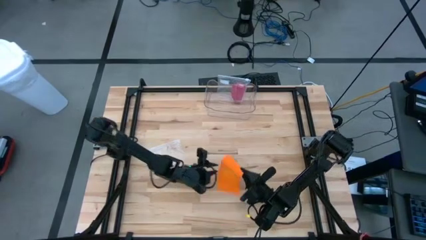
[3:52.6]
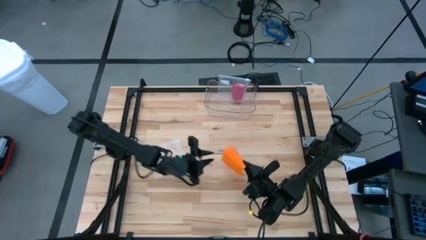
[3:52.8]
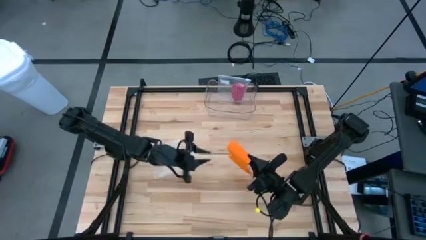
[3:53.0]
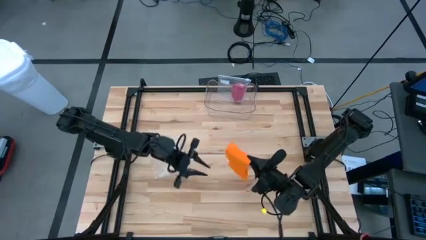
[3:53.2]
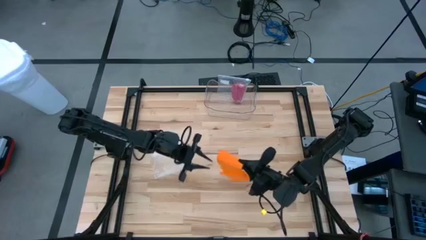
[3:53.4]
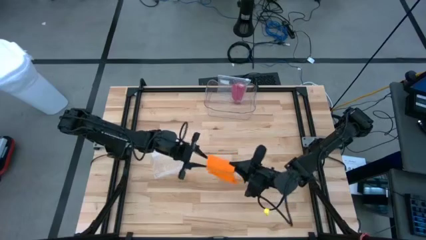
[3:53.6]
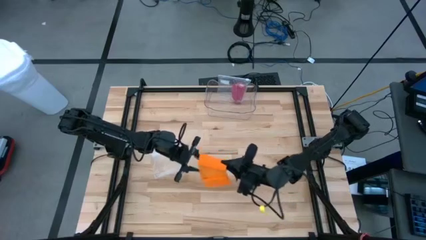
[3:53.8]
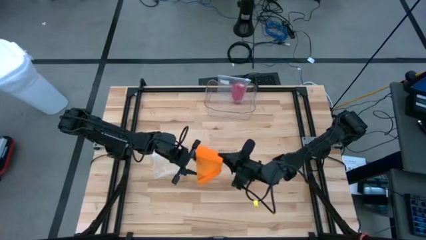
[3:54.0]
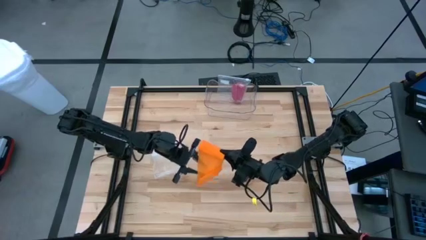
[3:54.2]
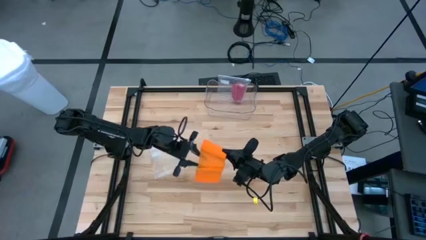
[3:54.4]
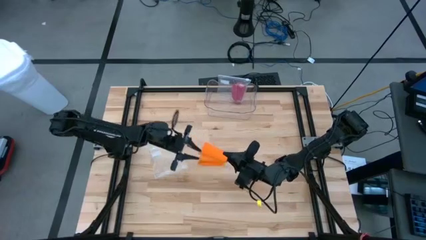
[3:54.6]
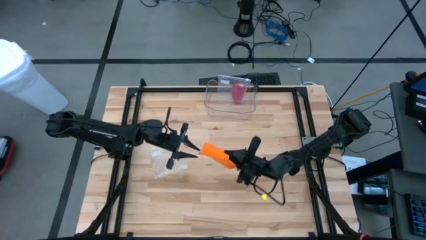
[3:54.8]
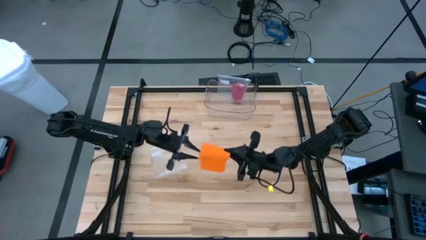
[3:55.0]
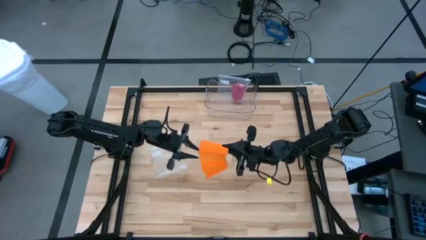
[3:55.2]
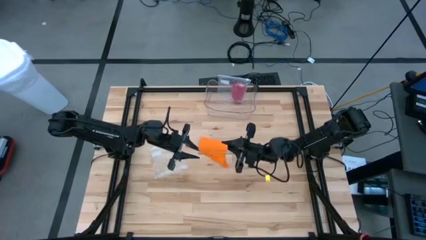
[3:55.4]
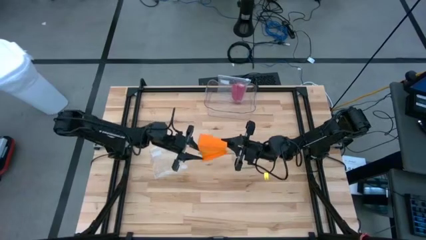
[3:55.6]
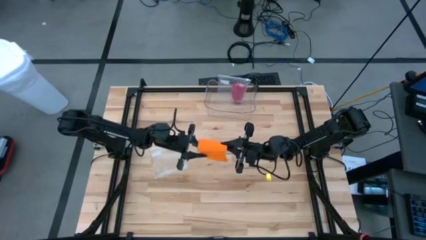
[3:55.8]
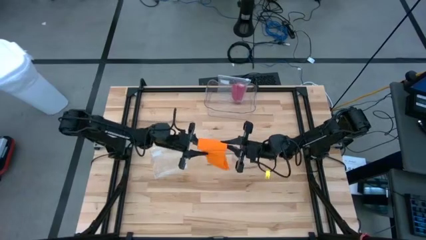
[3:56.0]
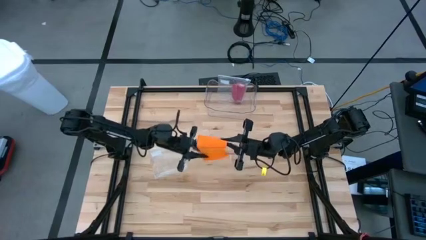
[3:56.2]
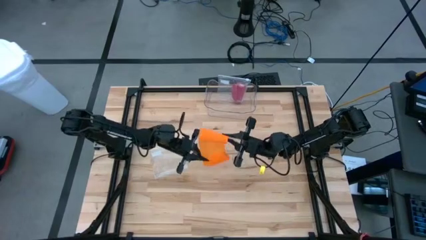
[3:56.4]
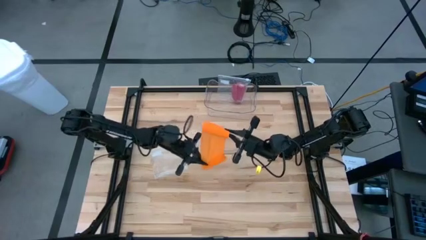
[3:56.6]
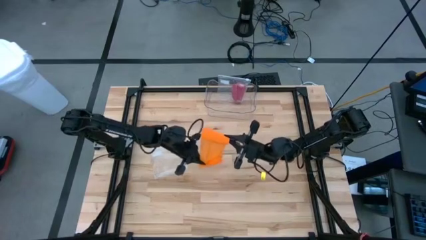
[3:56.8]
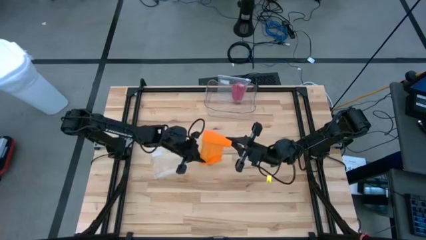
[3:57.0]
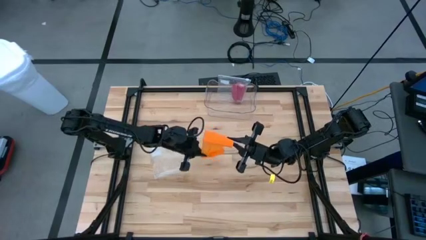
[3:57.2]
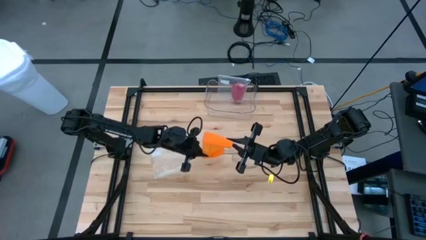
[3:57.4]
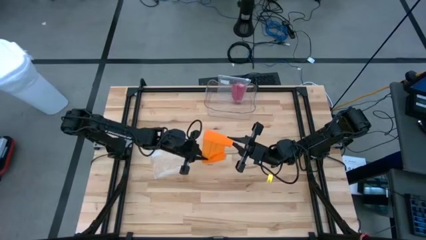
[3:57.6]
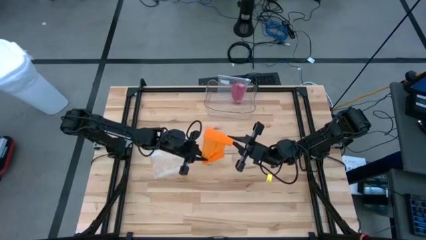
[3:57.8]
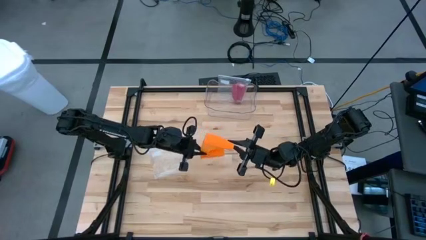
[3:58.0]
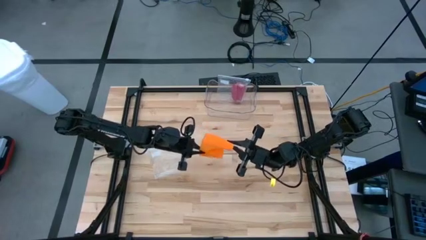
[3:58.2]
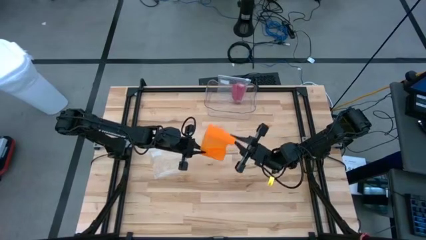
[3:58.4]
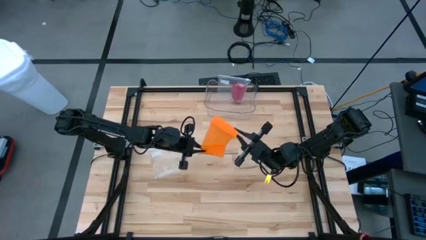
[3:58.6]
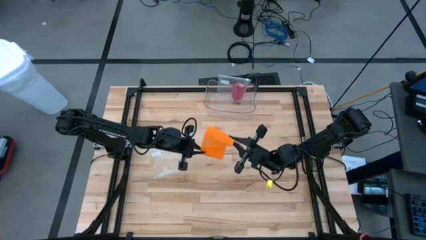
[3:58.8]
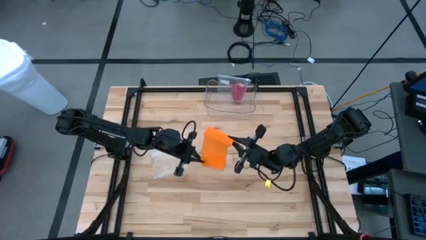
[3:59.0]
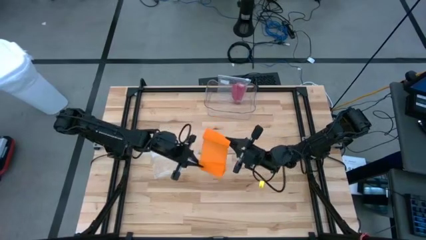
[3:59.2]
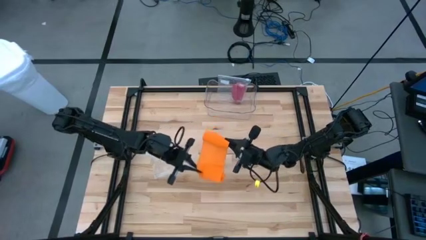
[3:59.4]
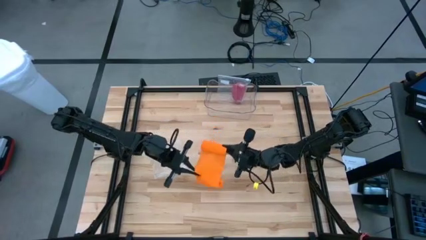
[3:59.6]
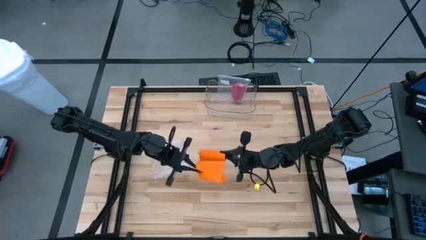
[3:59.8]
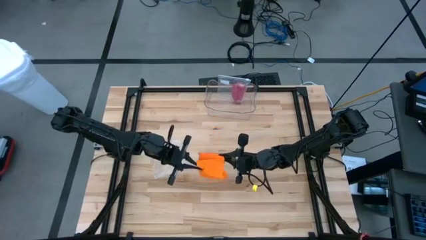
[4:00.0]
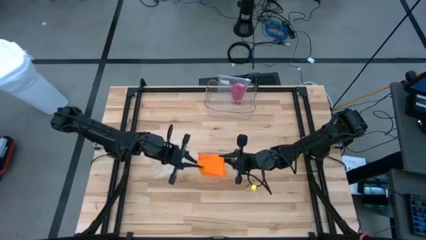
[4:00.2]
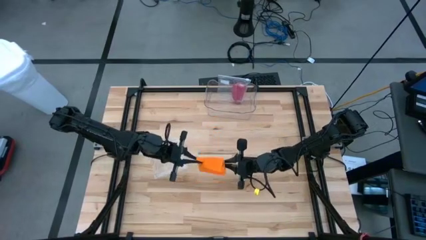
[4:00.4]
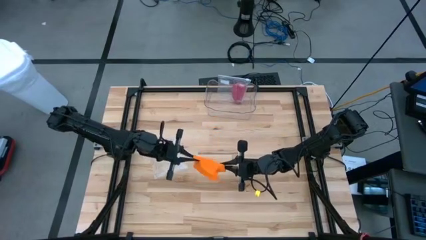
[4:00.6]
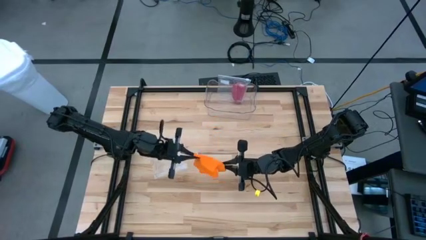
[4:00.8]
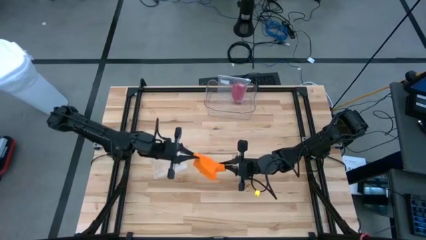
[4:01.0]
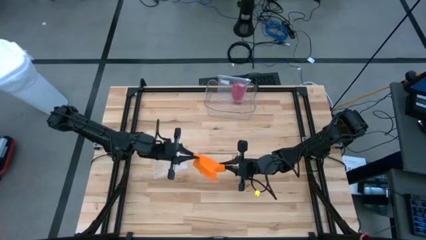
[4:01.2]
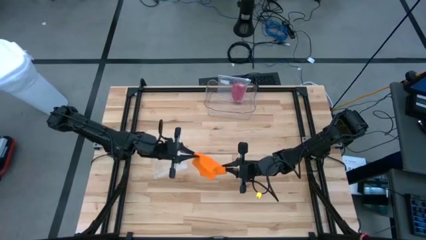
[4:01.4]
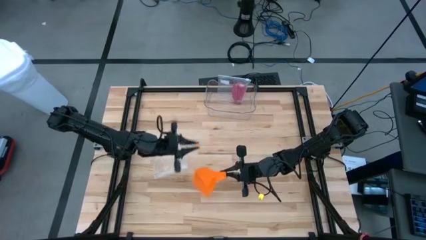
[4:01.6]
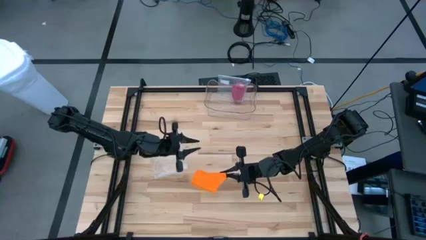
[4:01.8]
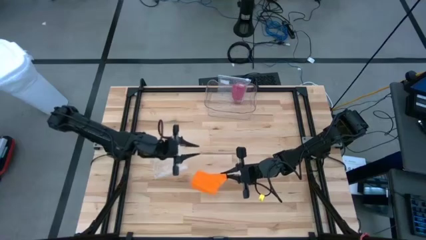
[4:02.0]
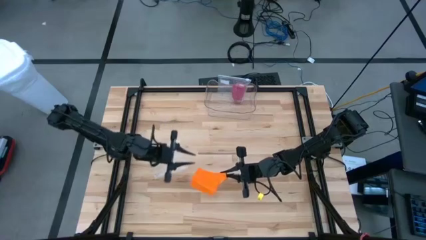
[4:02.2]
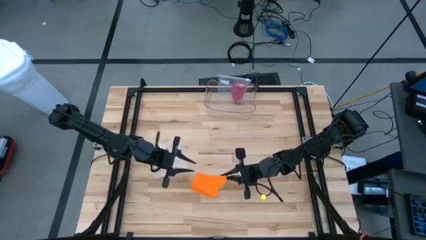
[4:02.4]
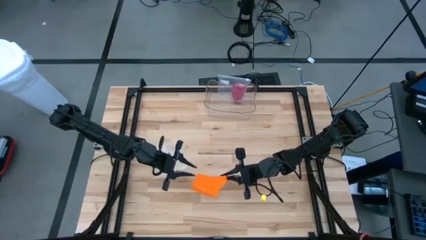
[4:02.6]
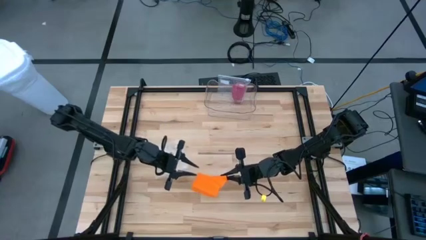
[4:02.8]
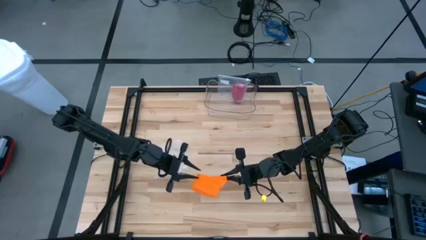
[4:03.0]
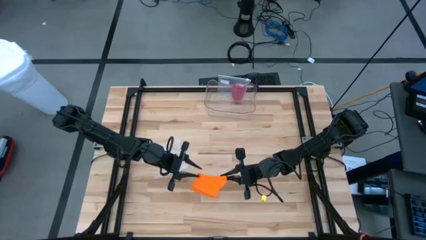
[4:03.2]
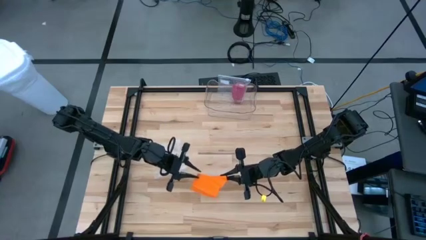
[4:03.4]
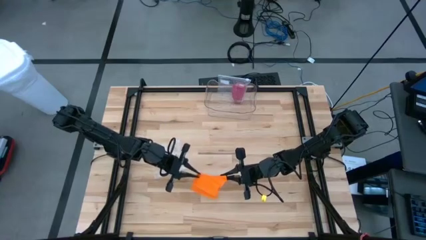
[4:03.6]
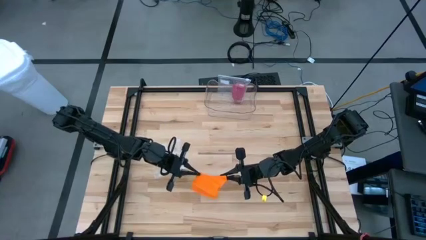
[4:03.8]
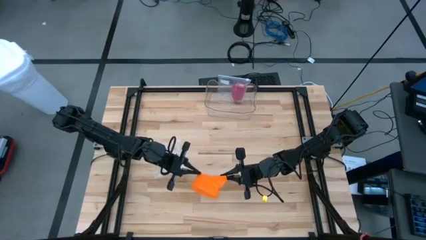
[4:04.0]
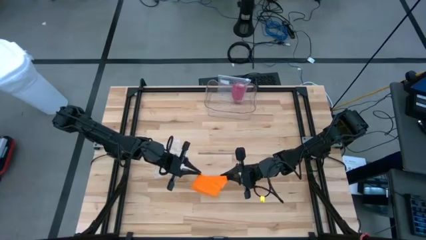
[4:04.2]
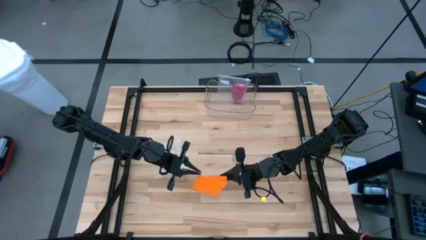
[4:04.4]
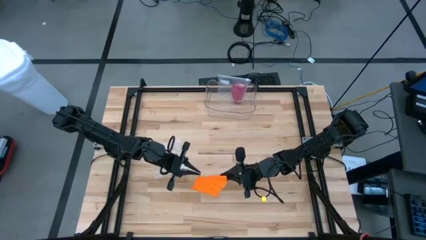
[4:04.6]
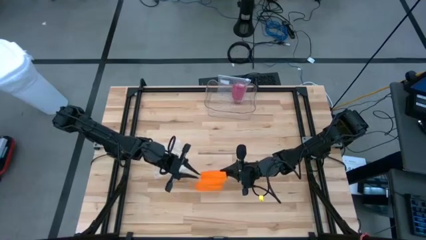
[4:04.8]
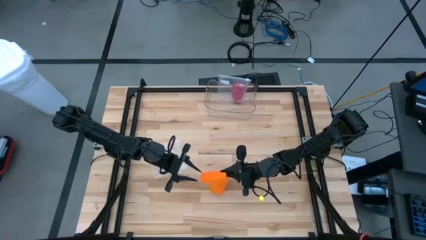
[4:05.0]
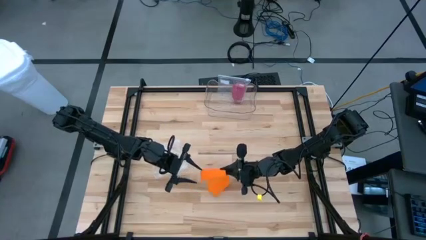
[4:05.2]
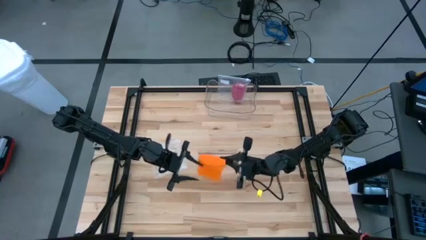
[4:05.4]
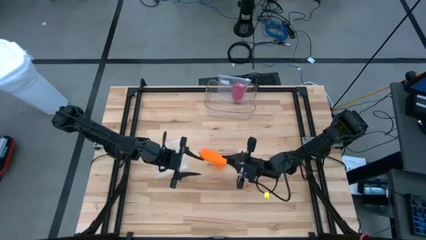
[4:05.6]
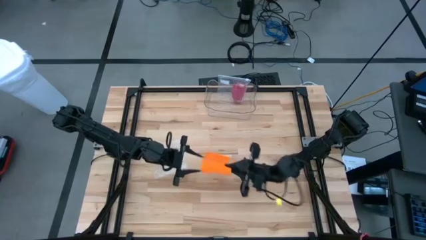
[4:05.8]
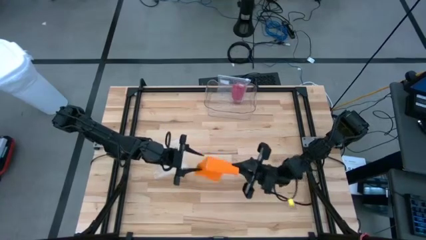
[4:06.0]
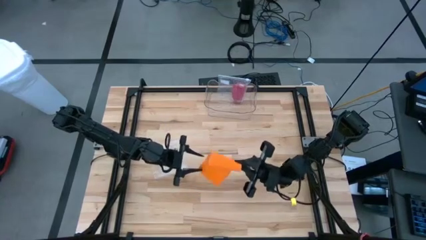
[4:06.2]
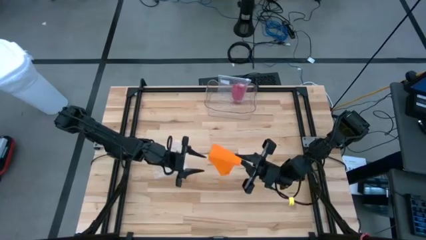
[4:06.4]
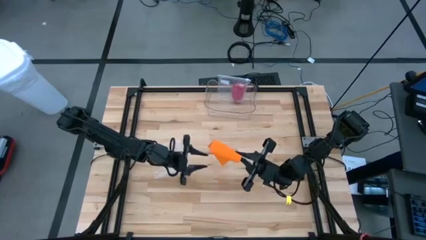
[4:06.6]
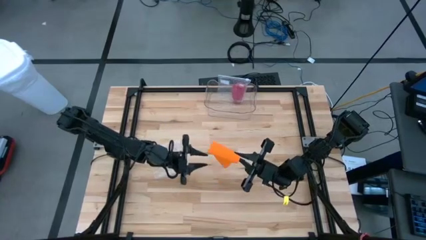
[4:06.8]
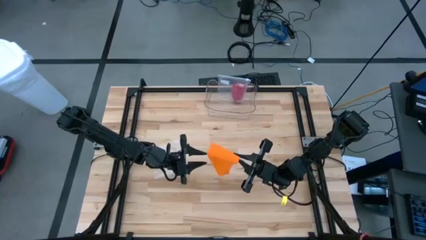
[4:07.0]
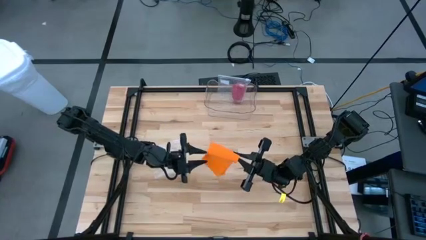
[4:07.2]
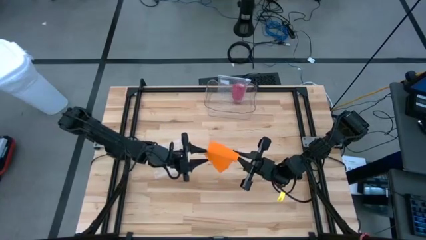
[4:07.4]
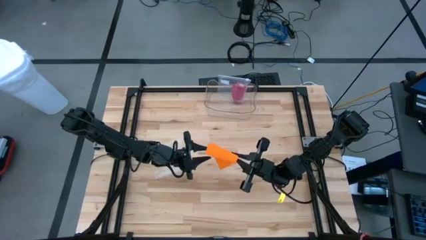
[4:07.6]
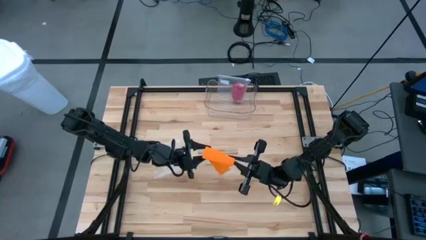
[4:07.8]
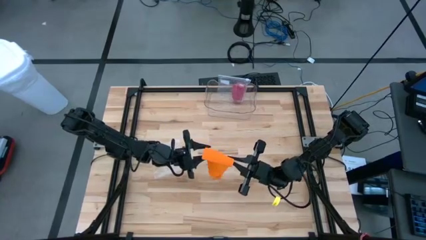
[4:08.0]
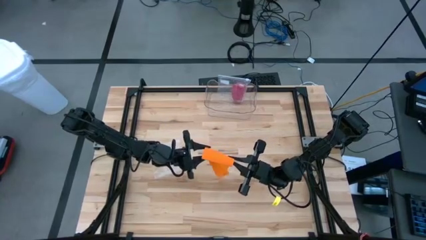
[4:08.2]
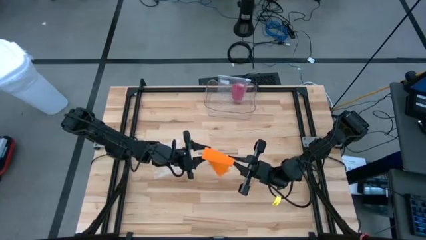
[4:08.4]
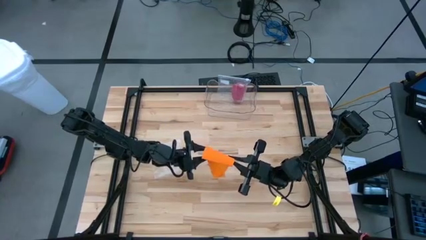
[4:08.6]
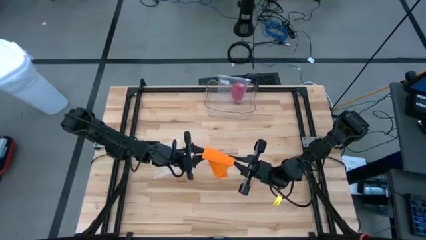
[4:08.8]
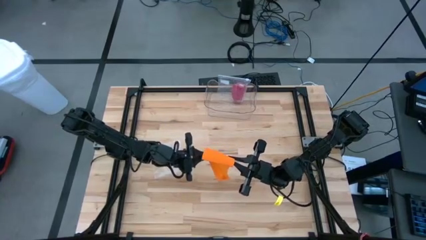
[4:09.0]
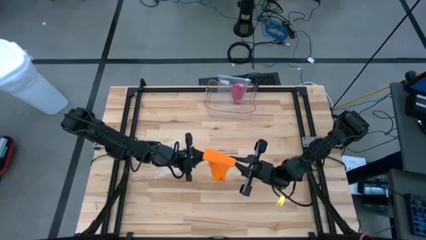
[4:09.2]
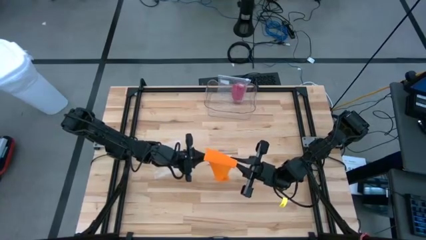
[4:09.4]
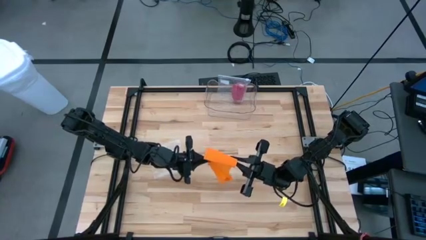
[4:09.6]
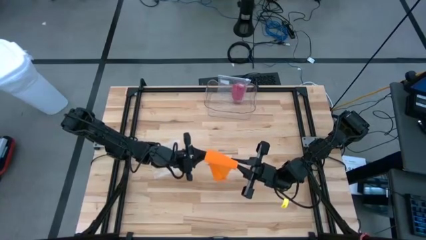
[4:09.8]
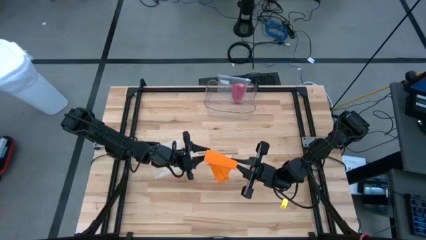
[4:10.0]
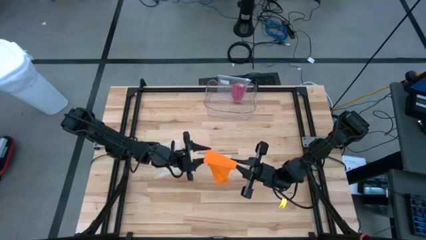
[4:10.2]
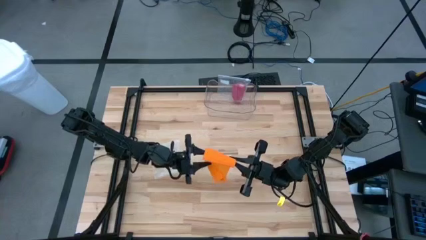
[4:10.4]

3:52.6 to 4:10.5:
Task: Roll bandage
Roll the orange bandage
